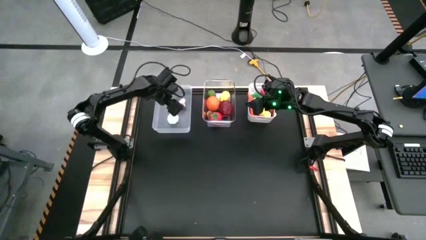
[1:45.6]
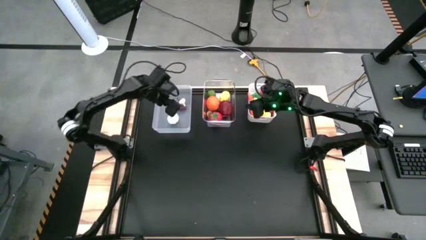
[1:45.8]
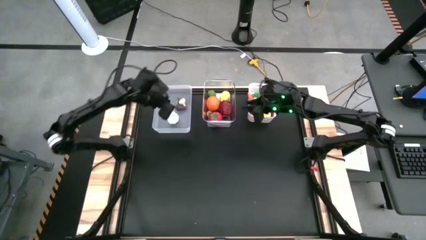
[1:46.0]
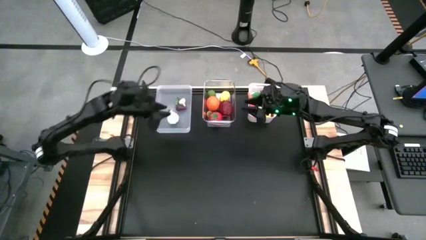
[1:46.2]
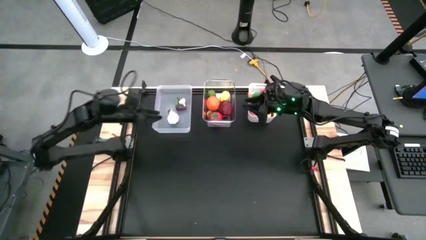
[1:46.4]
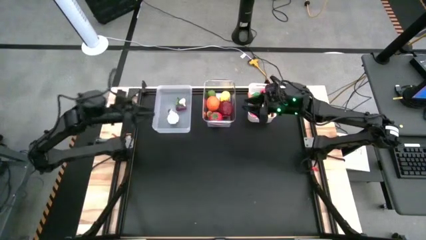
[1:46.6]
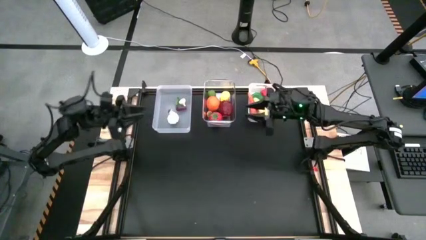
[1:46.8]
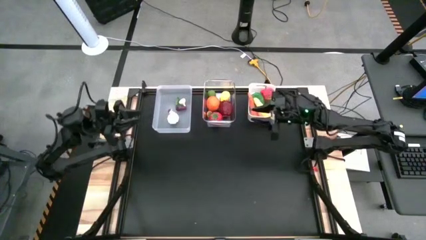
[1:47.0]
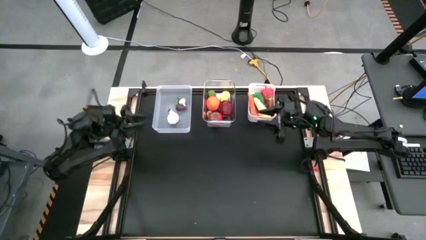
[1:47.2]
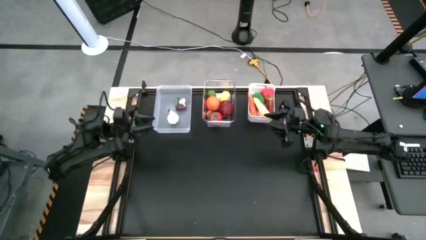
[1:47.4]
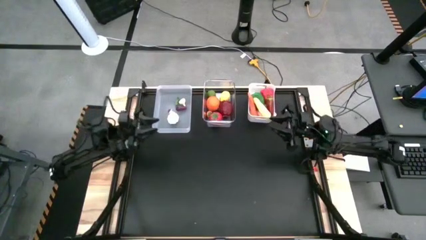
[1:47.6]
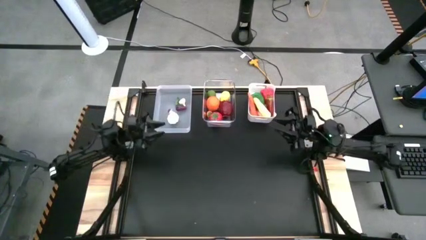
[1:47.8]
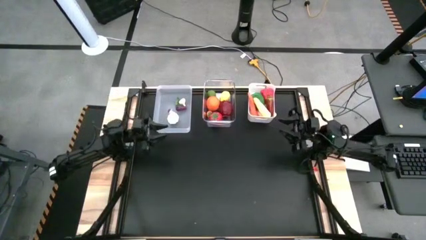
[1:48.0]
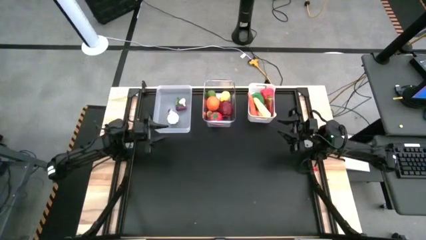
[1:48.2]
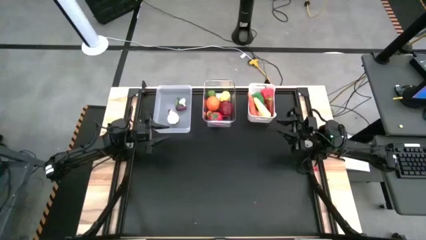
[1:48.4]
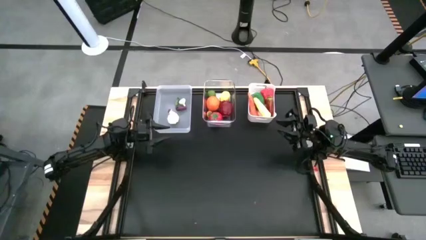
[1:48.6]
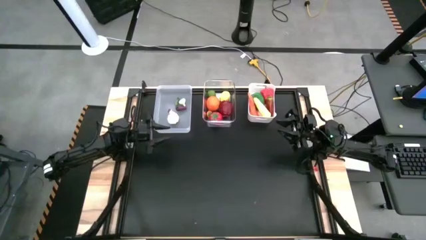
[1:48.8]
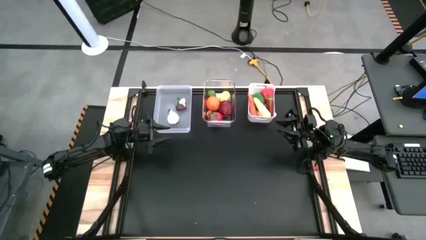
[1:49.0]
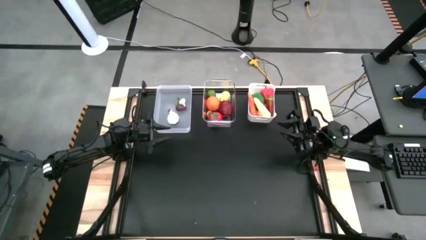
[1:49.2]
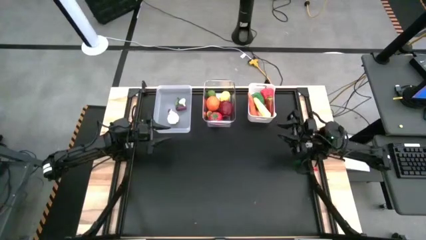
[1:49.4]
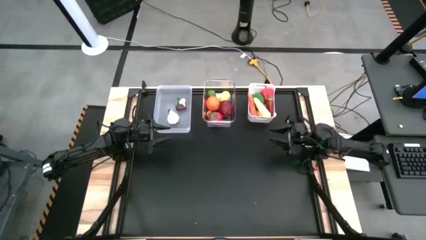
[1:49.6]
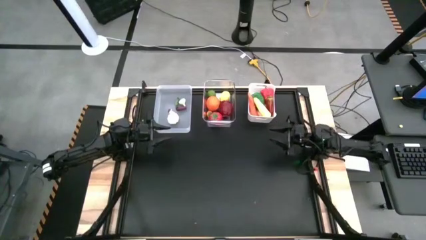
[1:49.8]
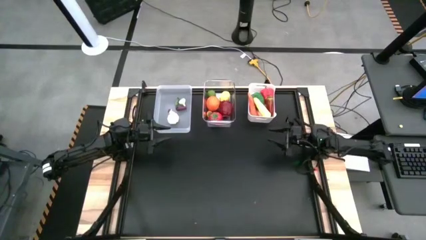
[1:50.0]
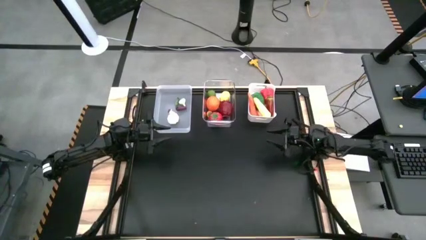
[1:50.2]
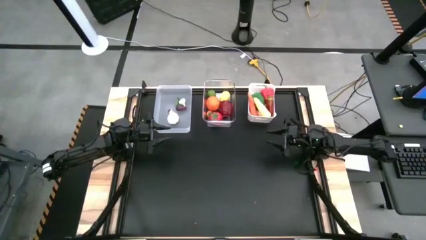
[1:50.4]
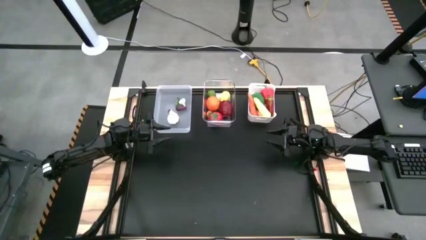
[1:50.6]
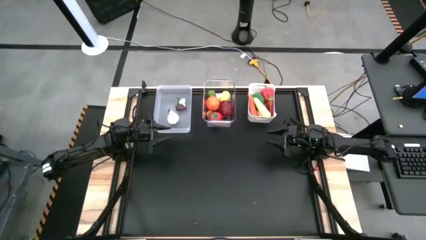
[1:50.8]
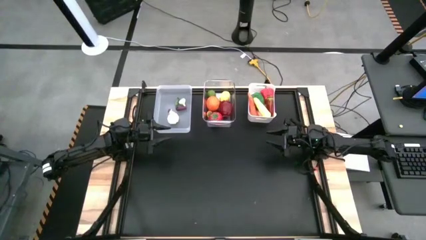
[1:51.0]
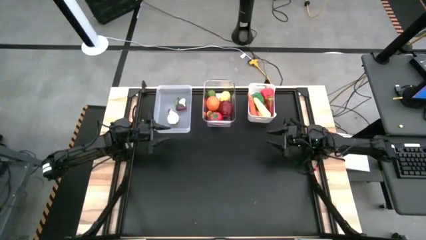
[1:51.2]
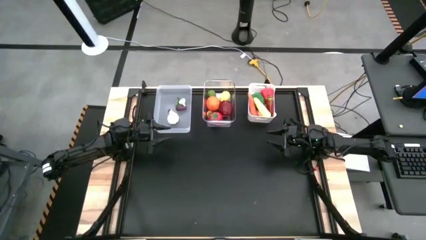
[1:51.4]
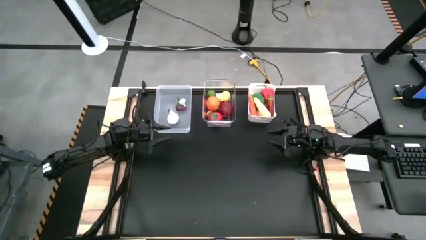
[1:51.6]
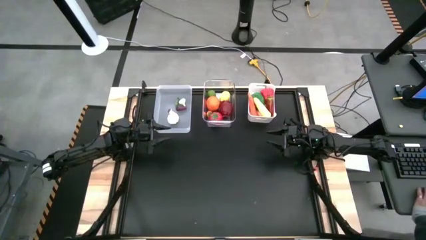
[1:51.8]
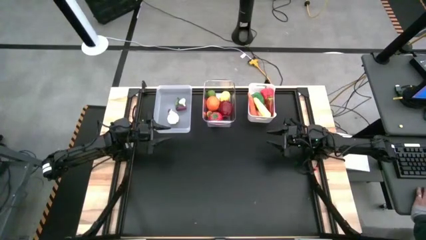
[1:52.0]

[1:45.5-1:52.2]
Task: Sort produce into baskets
Return to Home Position

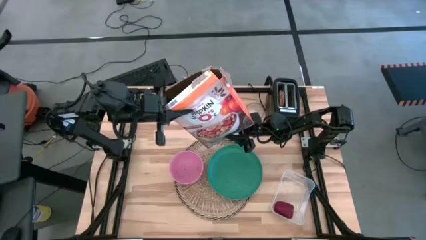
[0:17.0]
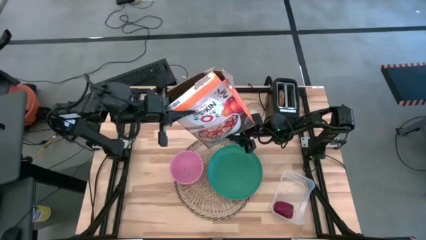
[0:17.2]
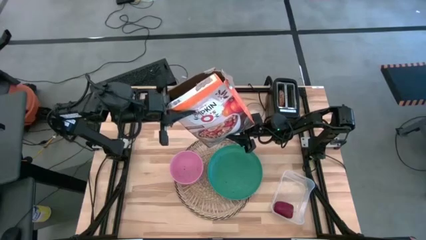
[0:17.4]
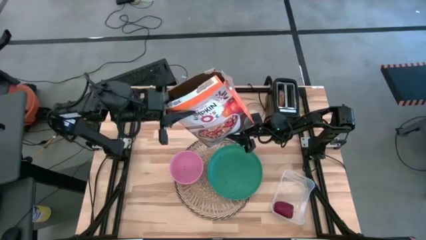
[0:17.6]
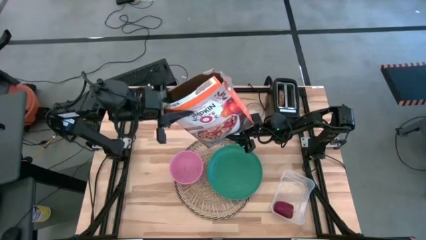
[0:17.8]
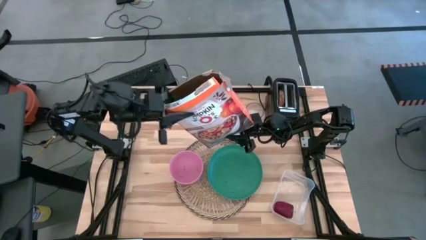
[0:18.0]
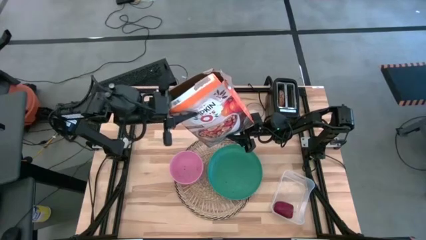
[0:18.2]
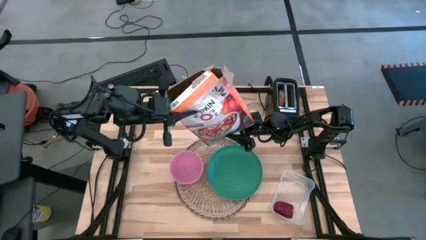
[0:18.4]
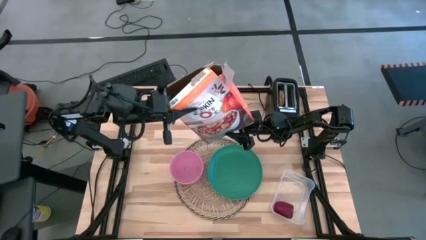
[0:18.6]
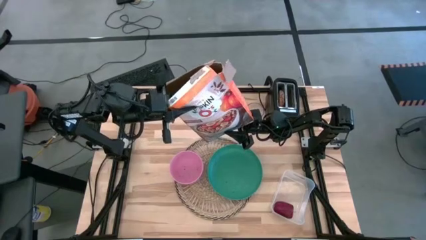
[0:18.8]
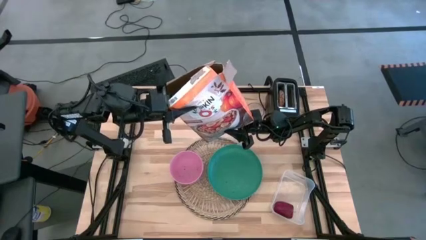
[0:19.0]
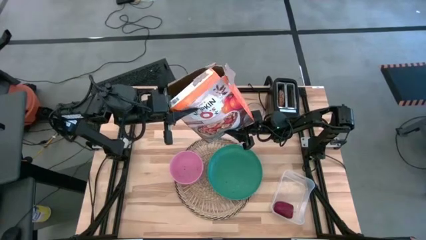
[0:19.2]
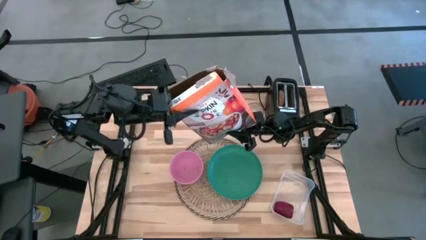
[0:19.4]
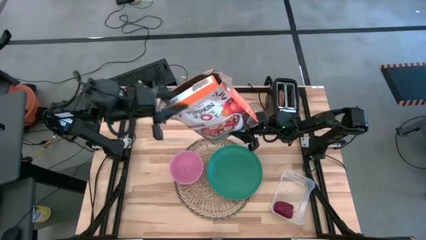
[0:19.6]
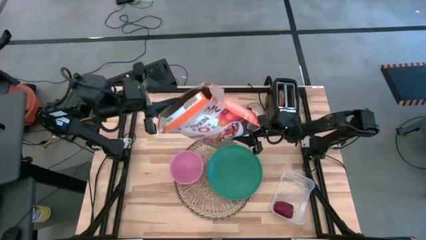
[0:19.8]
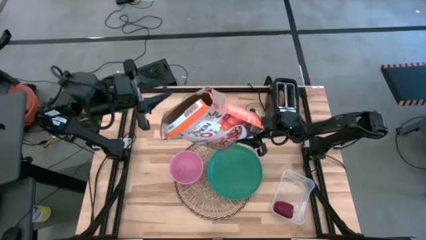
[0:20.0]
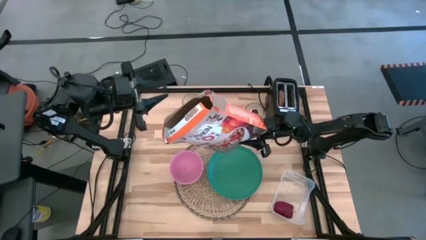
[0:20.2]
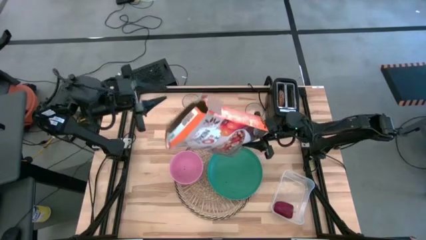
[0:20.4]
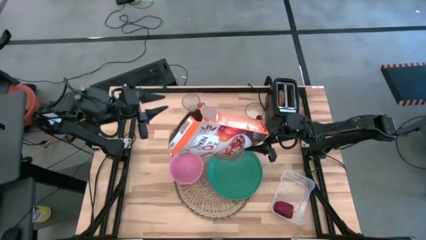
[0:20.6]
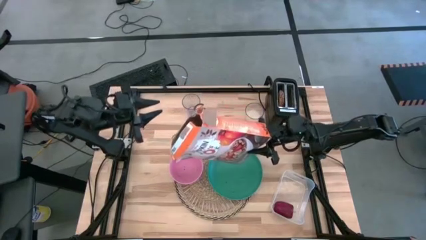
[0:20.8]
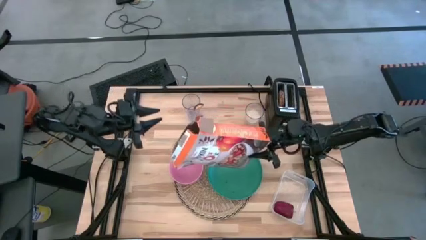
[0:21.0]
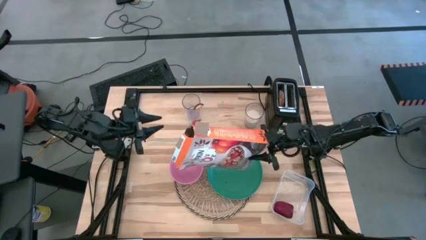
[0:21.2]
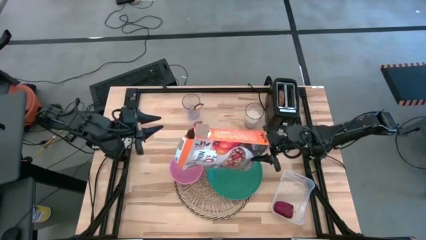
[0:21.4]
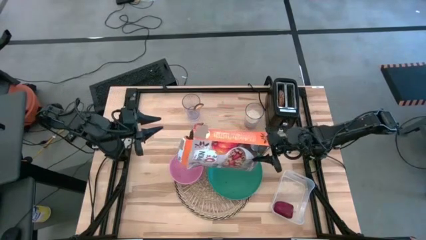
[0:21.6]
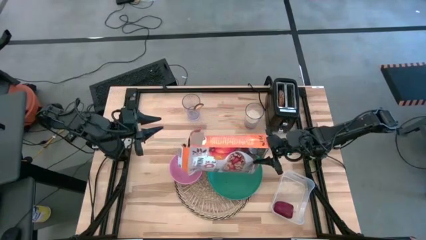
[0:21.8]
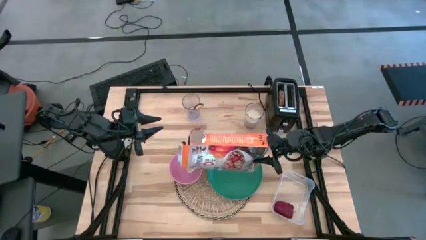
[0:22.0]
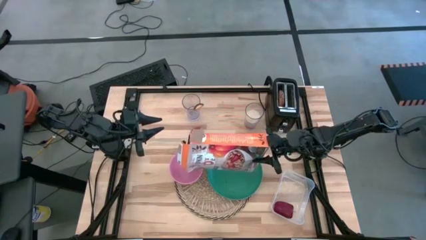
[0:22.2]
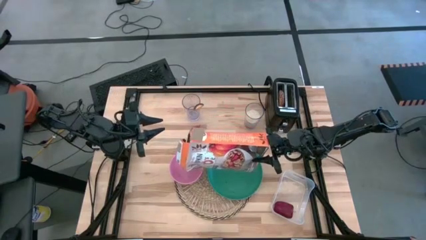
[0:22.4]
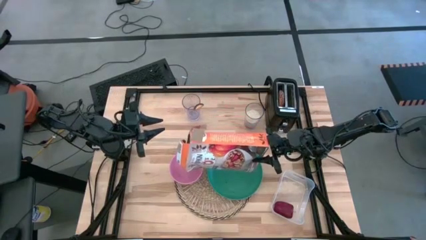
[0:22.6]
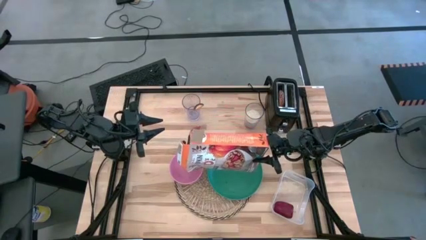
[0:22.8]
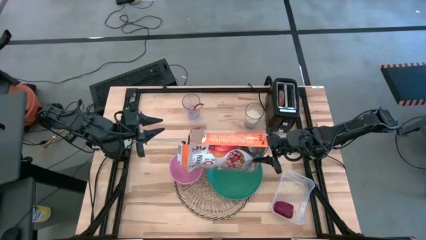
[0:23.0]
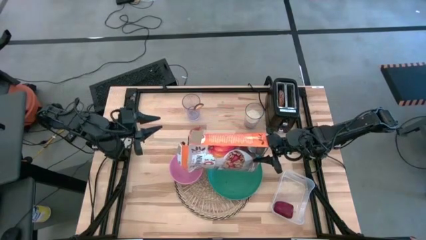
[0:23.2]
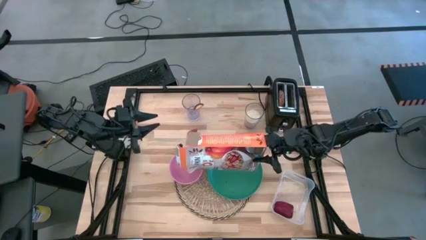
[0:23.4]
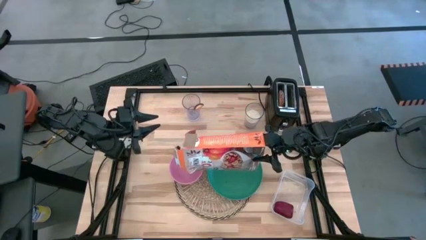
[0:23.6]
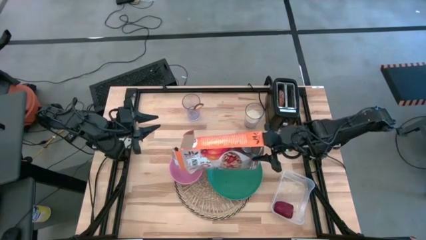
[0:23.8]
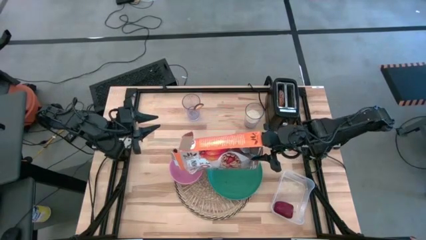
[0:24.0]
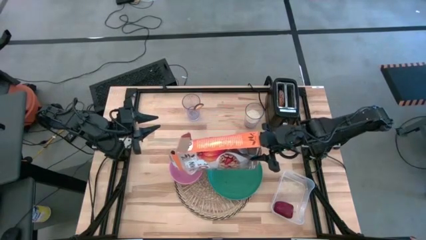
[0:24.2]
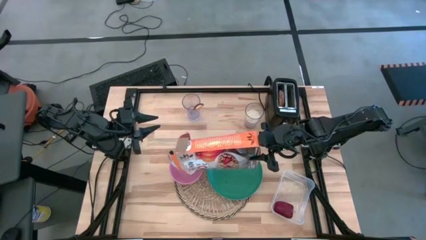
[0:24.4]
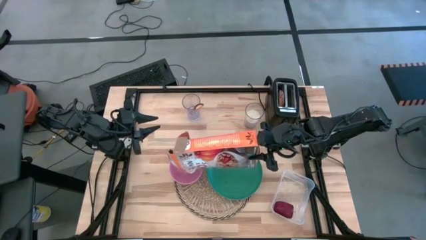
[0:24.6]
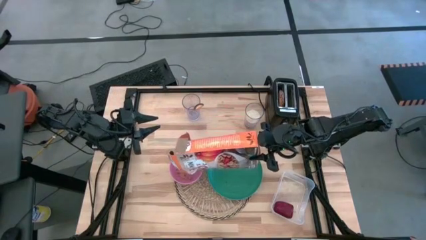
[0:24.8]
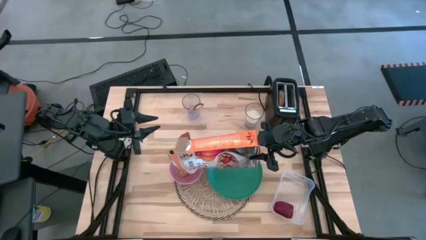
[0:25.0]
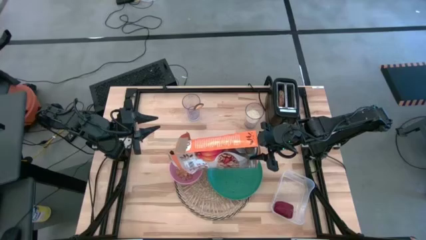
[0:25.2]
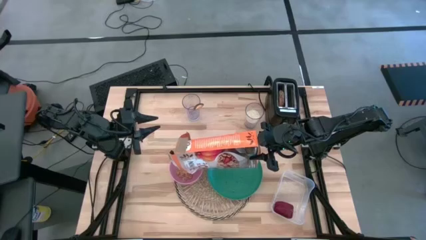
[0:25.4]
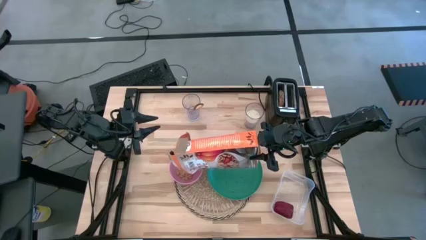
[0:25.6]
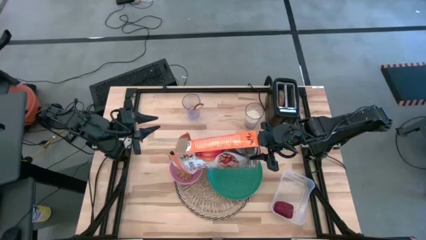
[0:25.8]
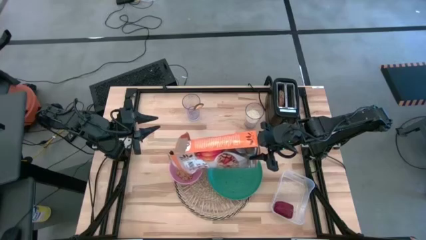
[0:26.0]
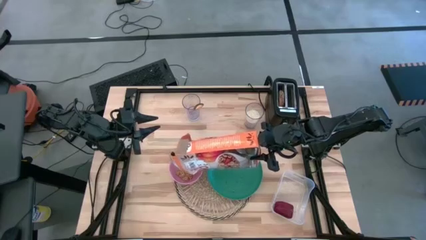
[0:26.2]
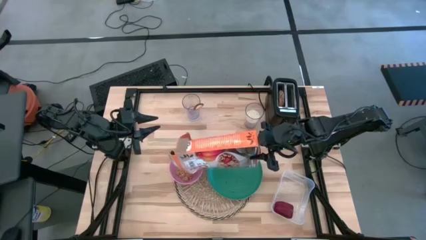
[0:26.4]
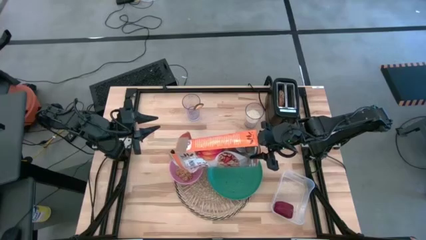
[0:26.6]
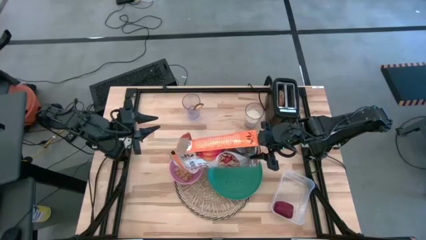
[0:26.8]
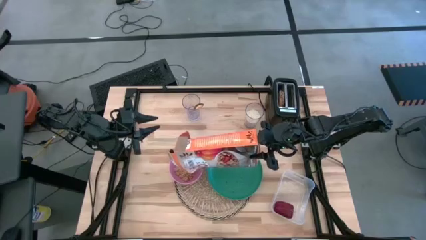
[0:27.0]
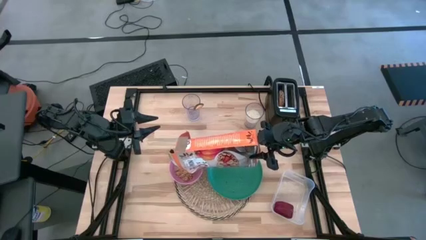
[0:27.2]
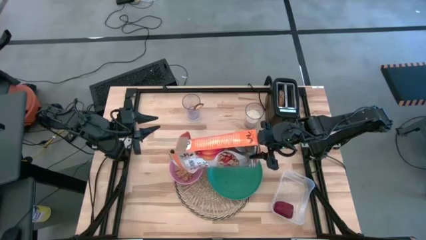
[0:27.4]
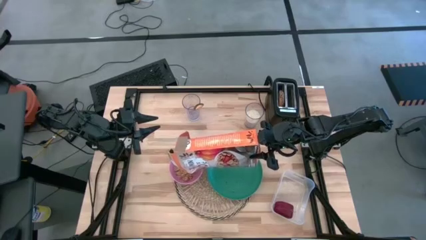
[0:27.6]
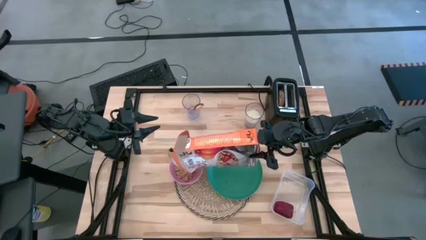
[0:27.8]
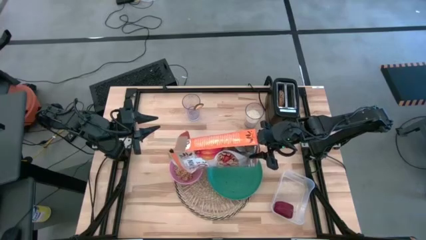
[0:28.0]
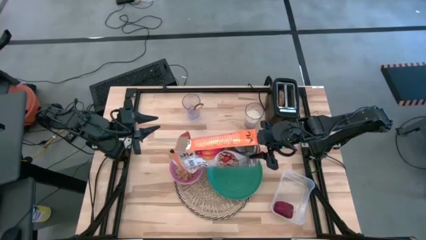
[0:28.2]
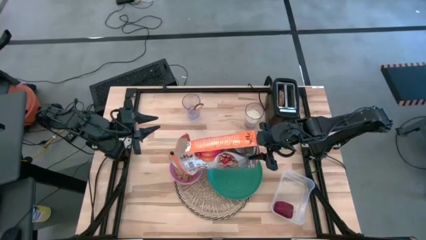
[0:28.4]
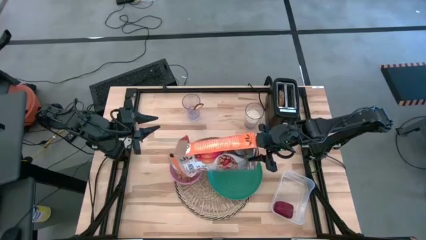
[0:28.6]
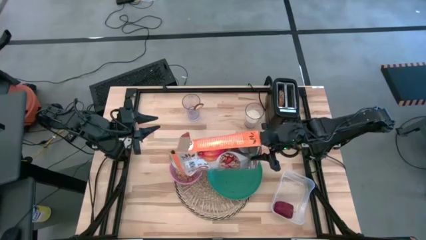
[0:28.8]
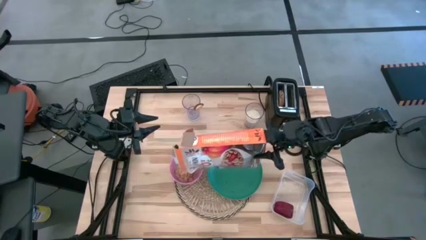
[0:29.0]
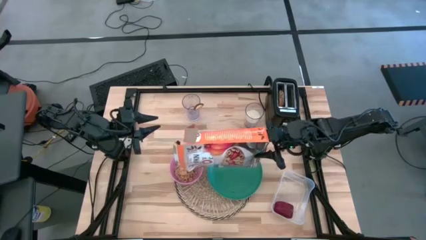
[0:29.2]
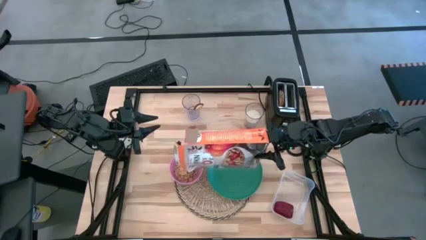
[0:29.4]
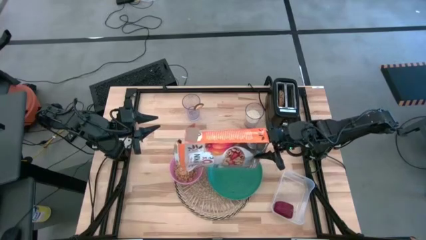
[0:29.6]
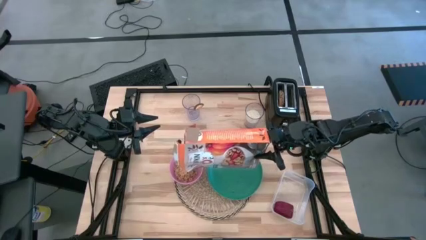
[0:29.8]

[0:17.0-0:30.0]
Task: Arrange a breakfast setting
Pour the cereal into the pink bowl from the cereal box
